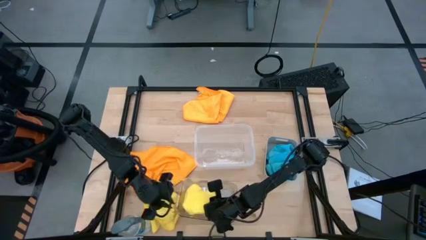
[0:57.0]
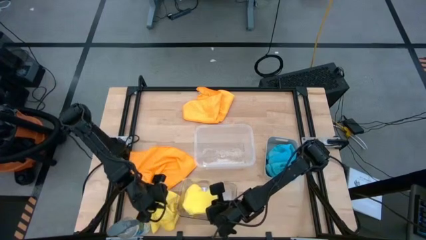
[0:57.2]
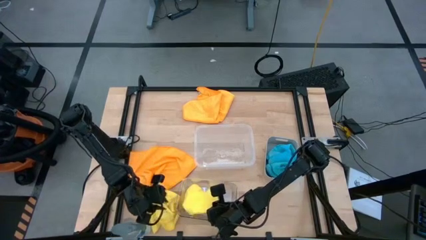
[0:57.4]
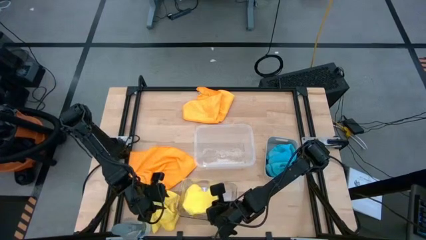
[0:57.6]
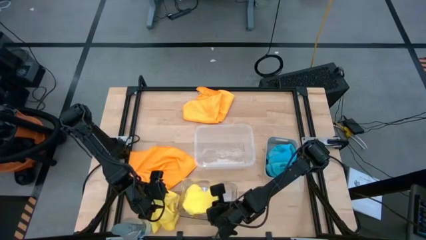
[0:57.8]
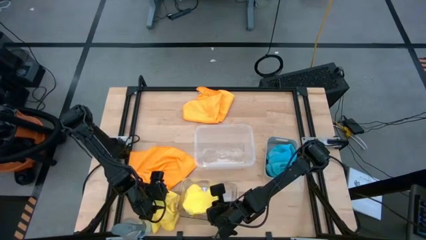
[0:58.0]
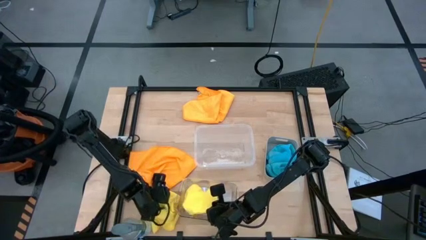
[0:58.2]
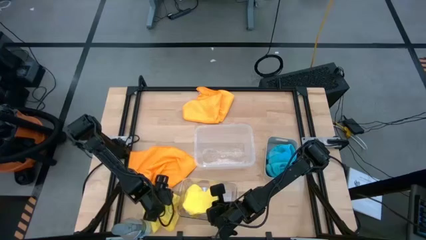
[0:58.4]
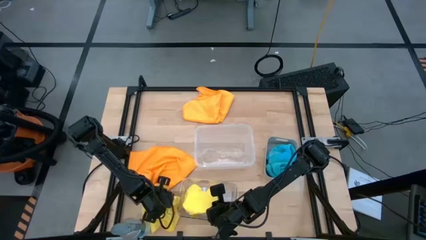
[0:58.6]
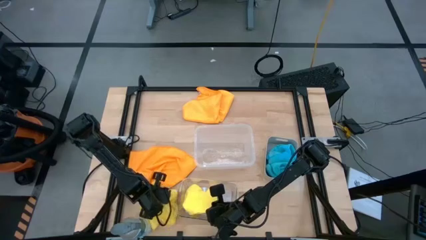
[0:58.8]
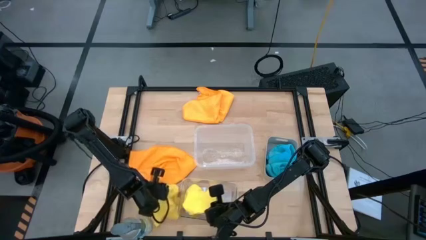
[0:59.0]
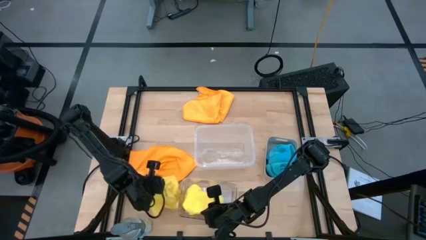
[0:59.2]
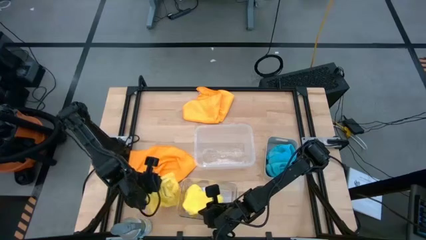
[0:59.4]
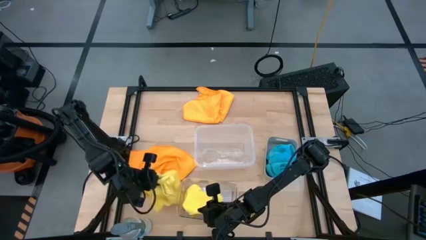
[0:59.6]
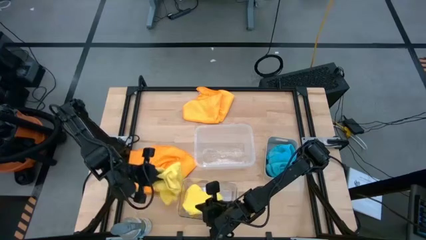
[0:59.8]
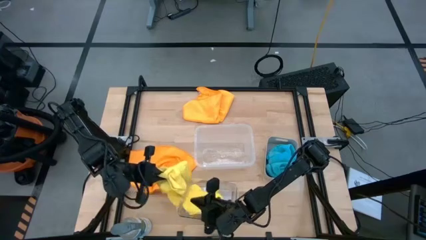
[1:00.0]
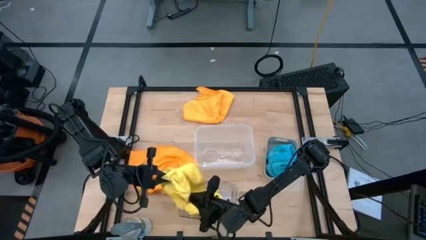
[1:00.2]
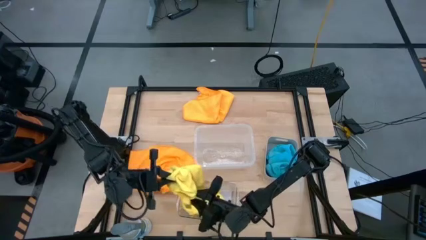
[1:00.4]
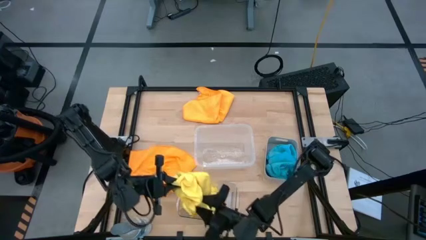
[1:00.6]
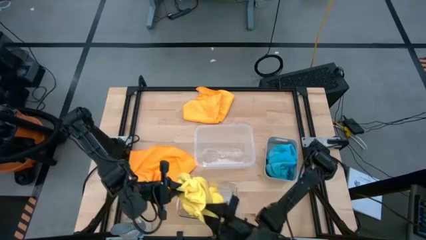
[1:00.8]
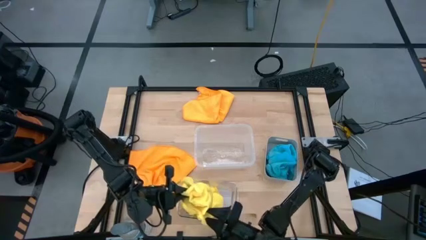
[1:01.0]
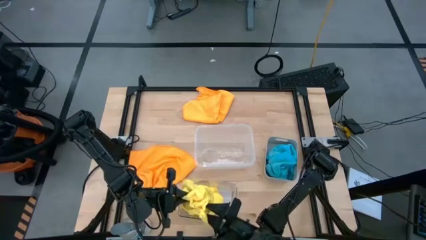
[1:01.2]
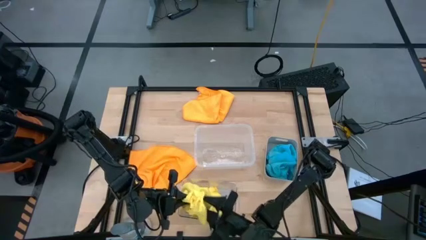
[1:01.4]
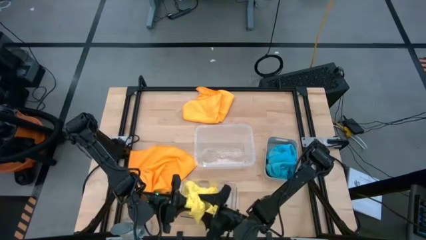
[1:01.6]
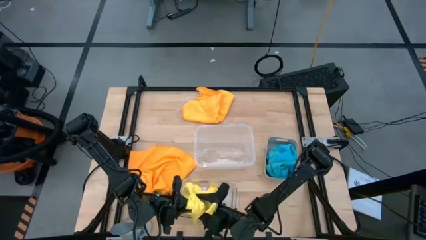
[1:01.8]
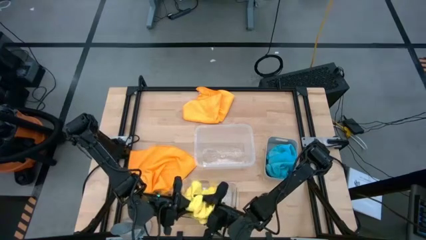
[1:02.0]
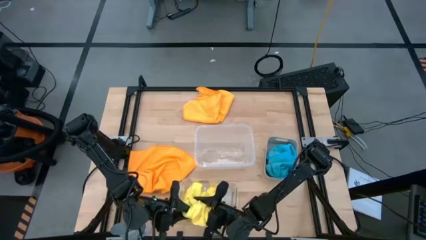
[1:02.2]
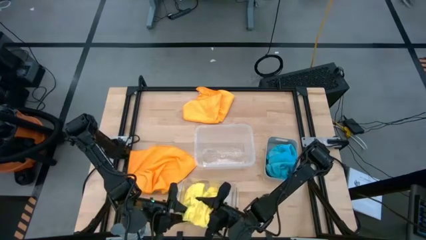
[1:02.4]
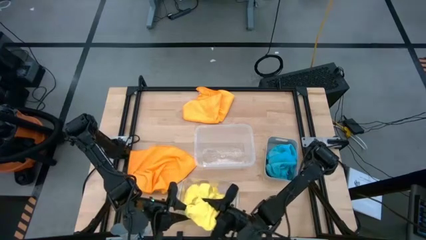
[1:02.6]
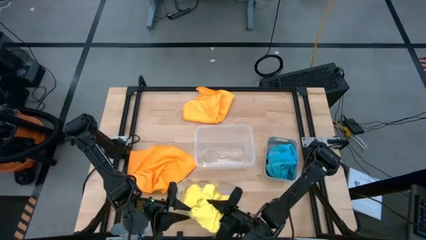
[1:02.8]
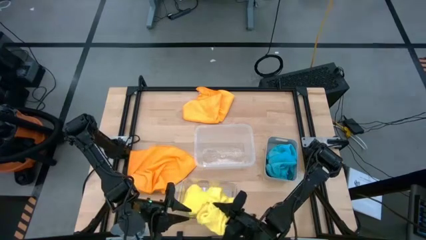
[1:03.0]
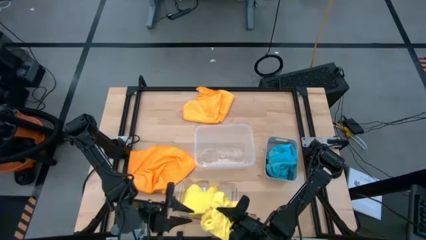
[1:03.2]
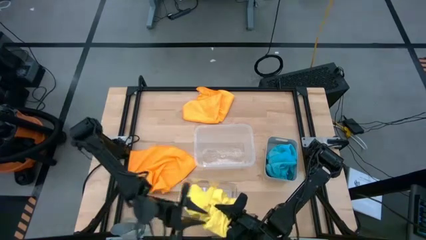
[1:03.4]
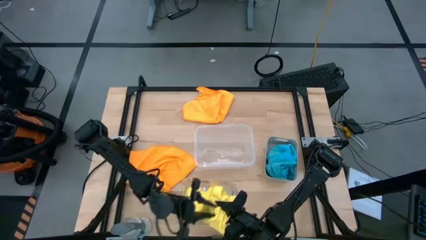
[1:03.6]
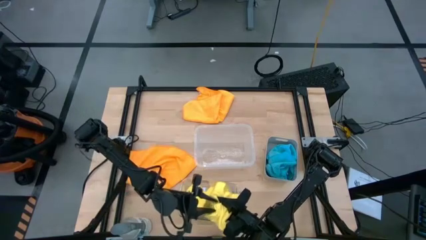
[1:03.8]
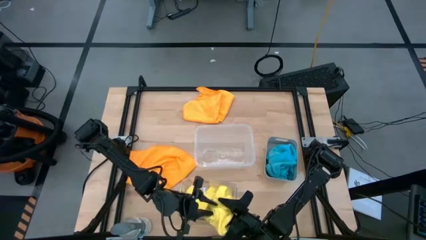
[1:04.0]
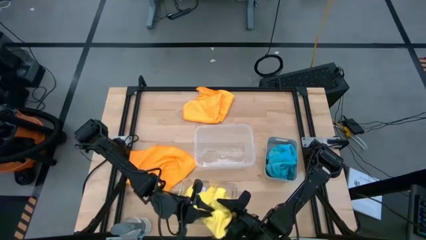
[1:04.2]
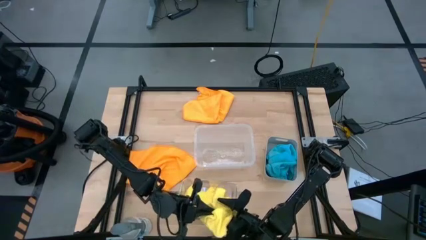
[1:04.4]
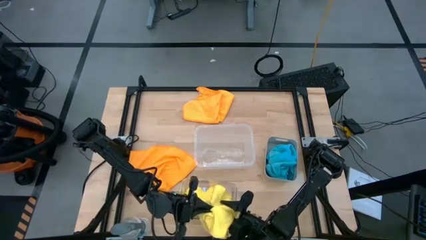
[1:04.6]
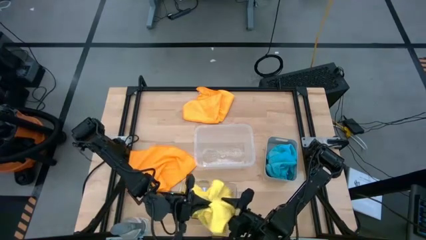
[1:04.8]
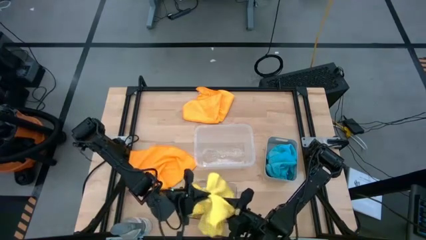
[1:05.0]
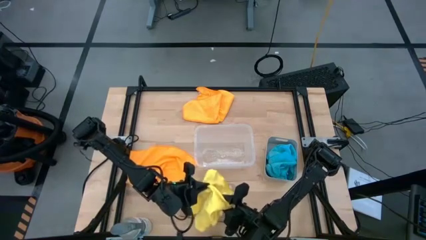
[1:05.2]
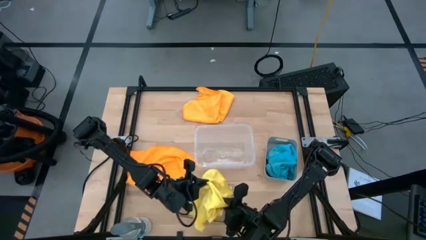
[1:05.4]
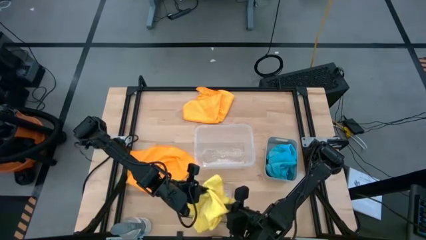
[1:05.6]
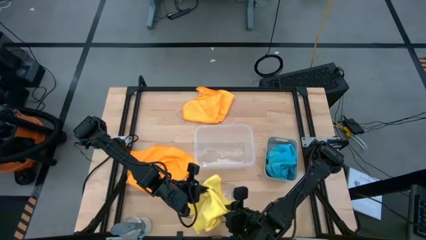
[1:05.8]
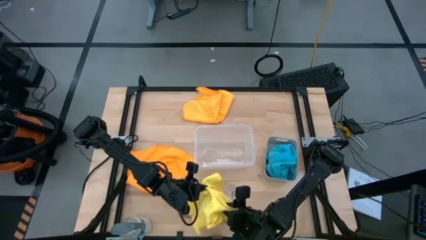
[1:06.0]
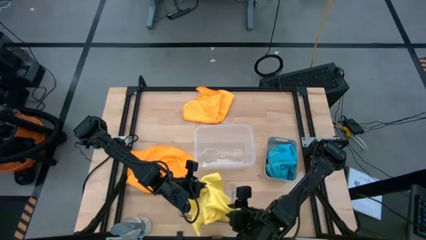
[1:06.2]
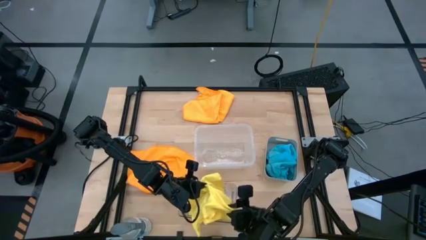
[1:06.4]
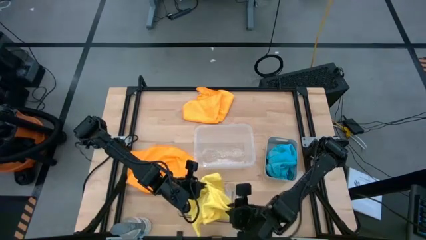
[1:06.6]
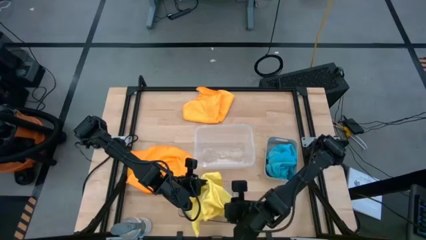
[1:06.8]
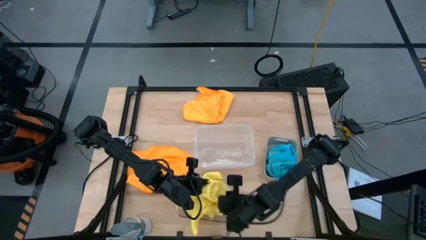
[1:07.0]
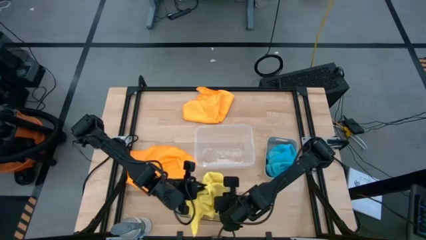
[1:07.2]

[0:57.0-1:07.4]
Task: Sort microfiber towel by color & place in baskets
Put the yellow microfiber cloth into the transparent bin

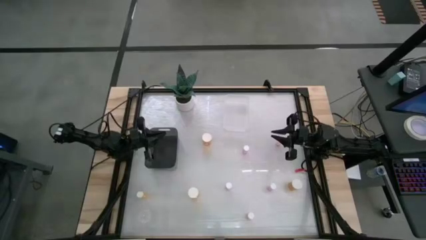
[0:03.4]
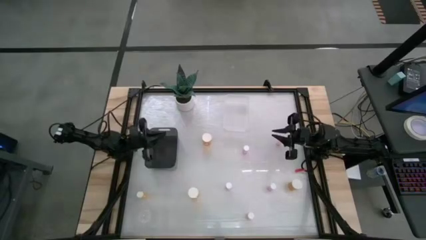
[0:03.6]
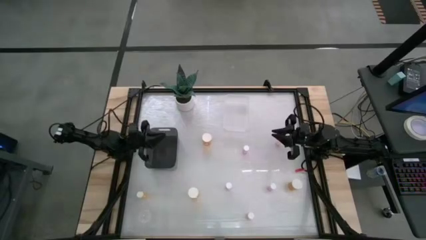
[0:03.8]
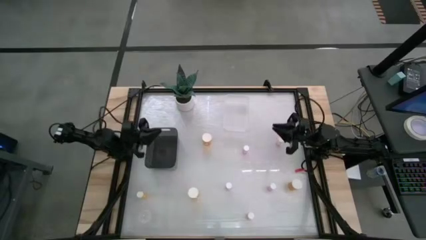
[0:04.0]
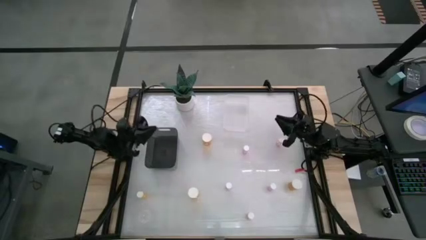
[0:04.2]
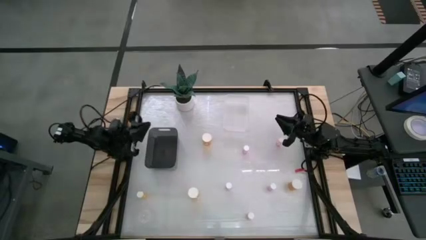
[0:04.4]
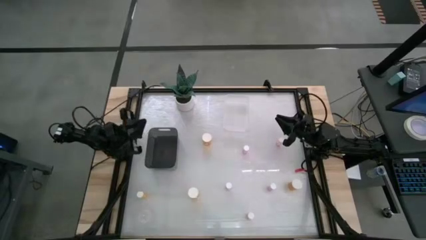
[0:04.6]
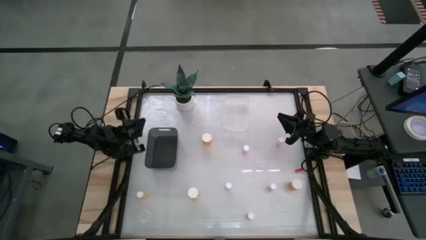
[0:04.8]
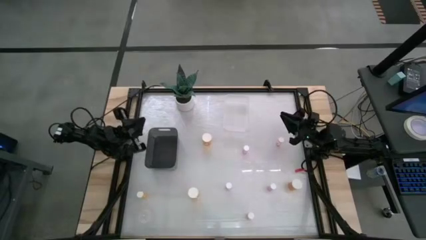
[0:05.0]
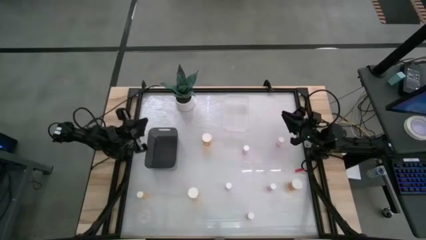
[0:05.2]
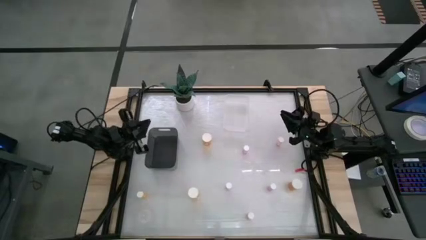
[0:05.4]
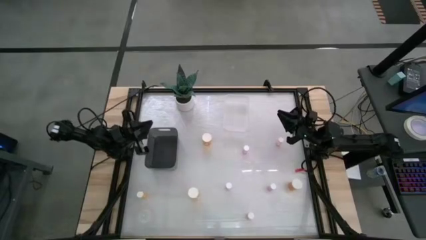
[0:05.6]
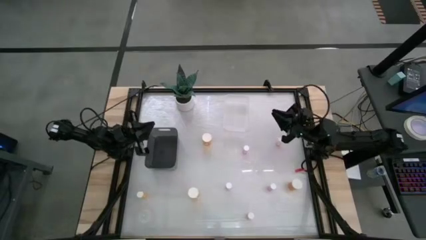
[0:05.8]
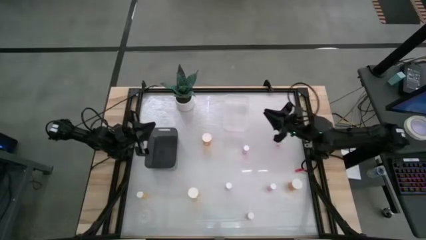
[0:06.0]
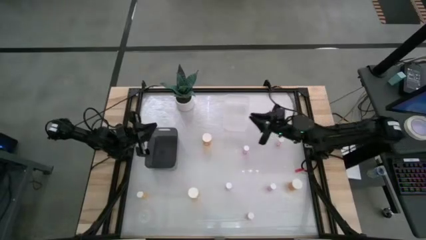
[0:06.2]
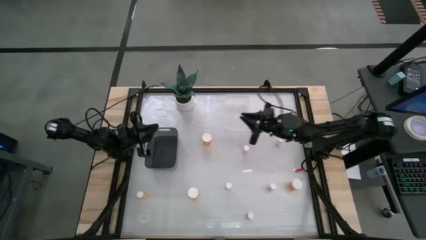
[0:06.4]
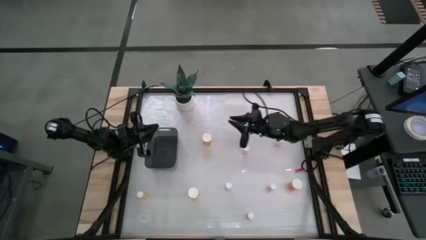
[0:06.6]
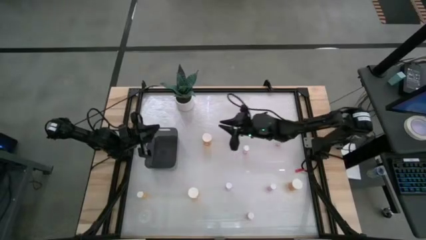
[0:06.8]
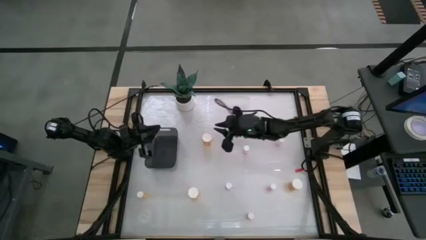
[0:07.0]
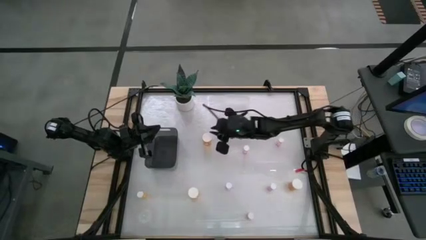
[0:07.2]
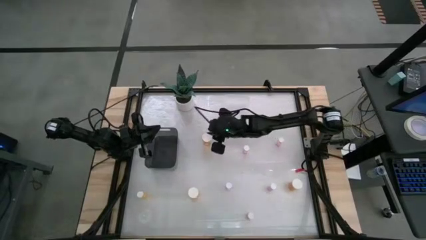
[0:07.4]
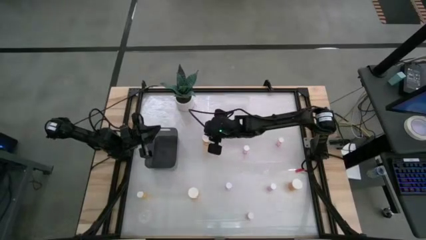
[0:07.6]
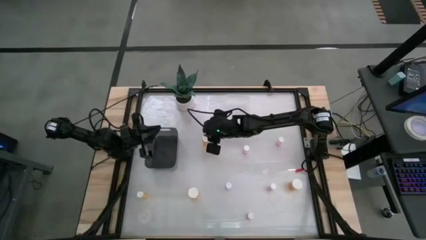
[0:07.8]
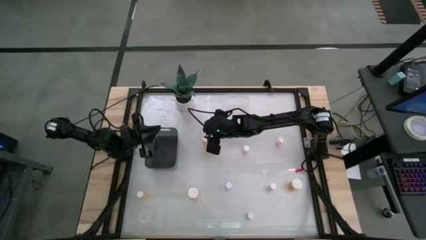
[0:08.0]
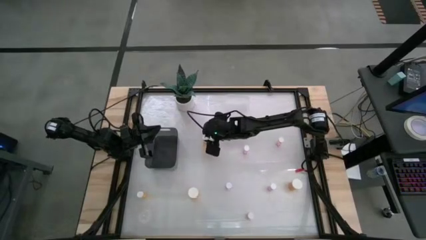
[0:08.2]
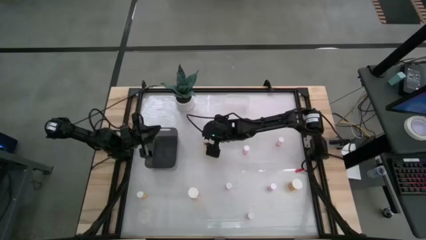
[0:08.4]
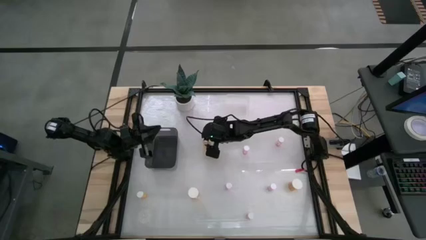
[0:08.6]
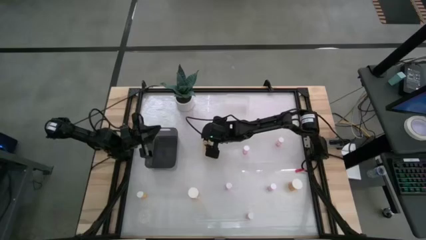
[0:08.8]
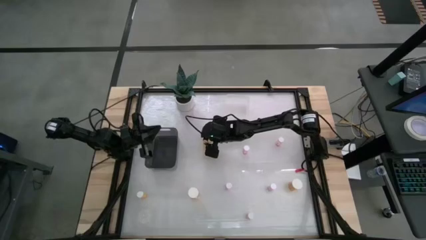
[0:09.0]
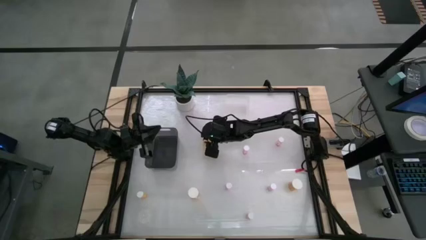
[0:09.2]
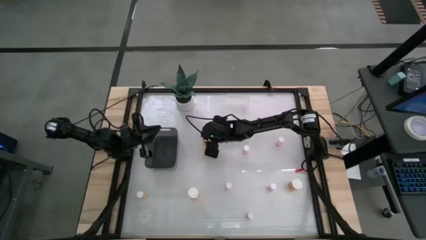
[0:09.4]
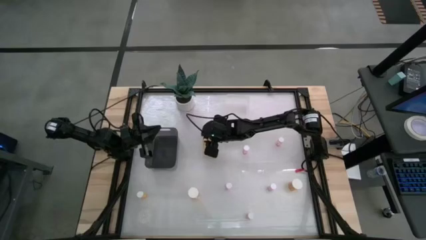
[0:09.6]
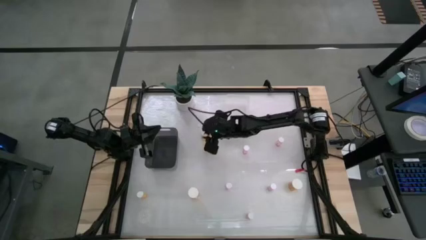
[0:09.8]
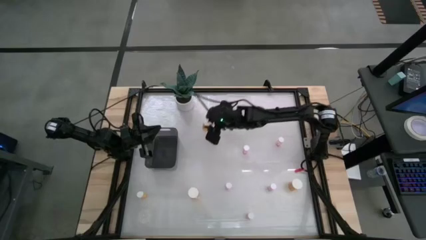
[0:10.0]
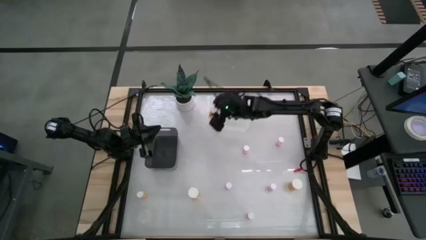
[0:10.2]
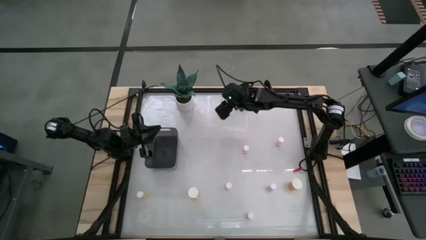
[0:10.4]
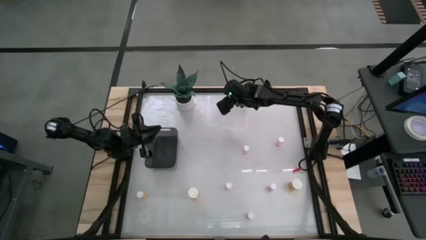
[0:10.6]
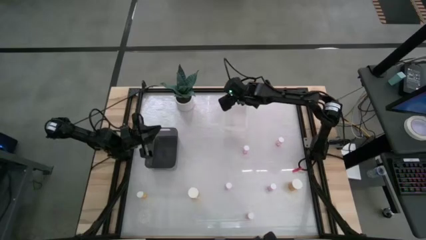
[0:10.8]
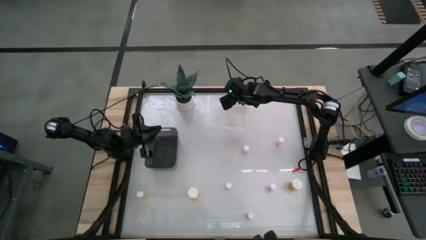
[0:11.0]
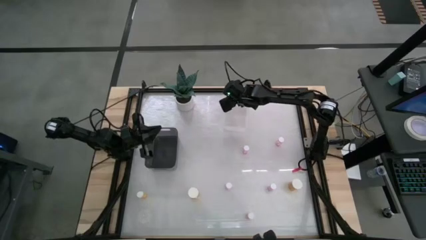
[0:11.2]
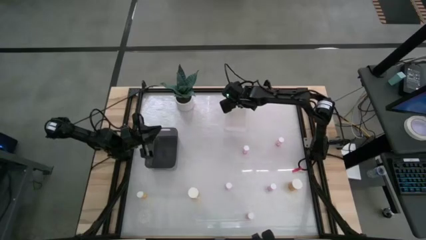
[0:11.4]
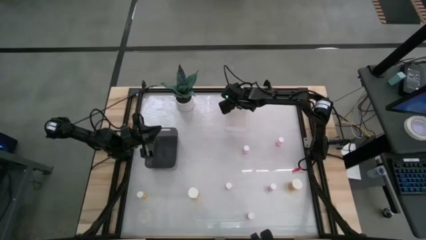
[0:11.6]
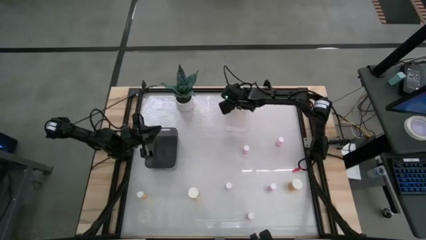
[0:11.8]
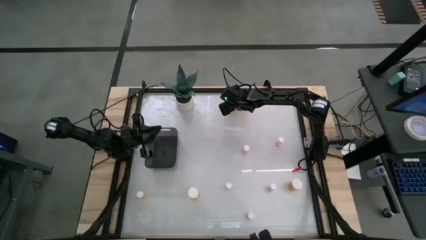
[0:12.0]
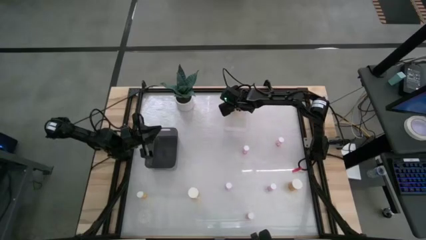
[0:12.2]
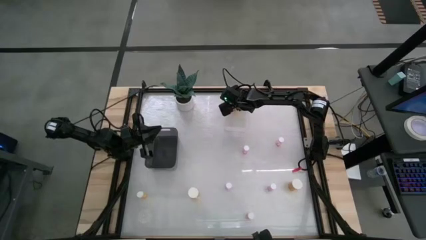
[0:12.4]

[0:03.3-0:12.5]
Task: Pick and place medicine bottles into bin by pill shape (circle, oval)
Put the top left big orange pill bottle into the transparent bin
